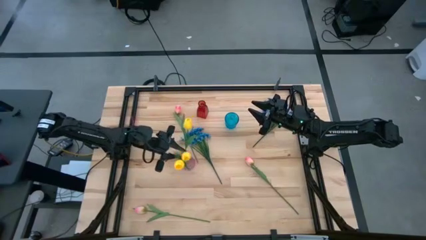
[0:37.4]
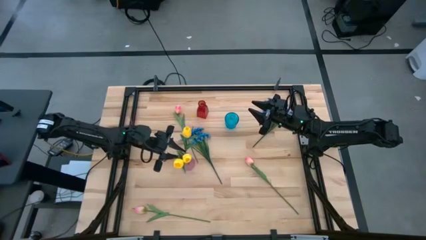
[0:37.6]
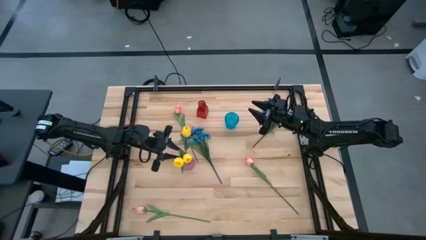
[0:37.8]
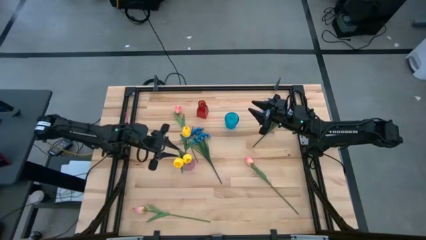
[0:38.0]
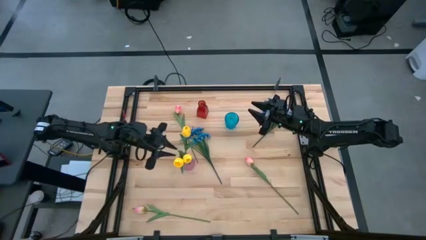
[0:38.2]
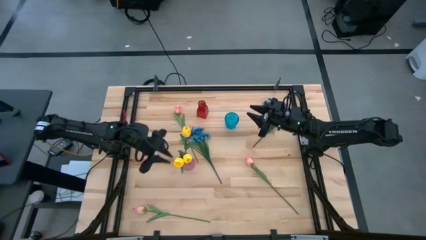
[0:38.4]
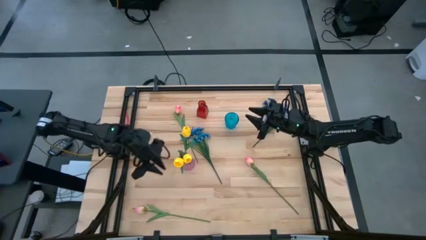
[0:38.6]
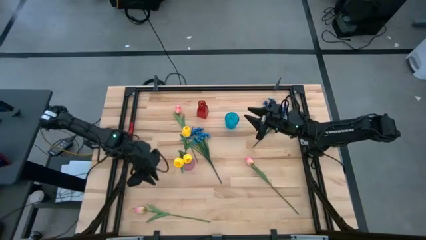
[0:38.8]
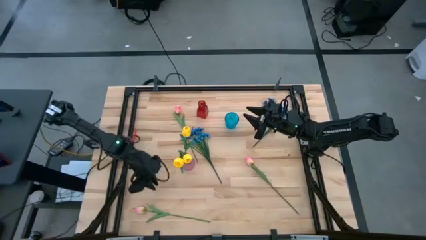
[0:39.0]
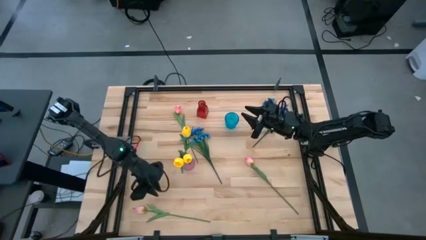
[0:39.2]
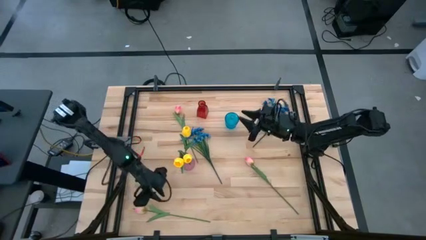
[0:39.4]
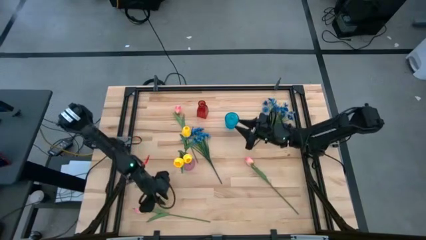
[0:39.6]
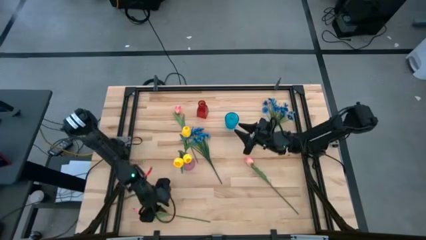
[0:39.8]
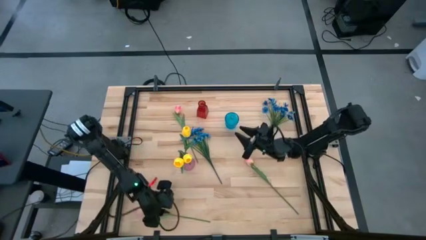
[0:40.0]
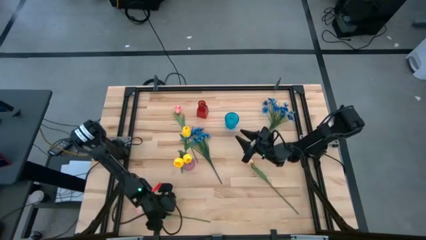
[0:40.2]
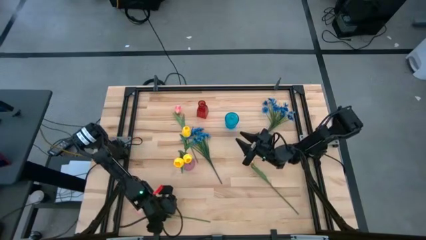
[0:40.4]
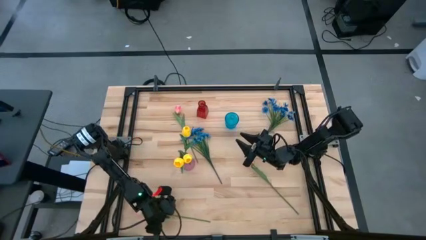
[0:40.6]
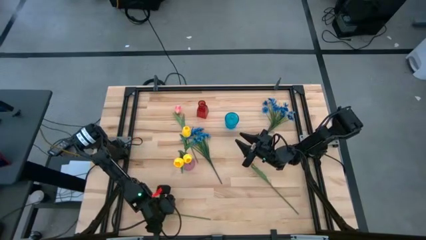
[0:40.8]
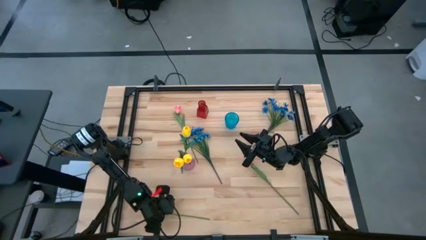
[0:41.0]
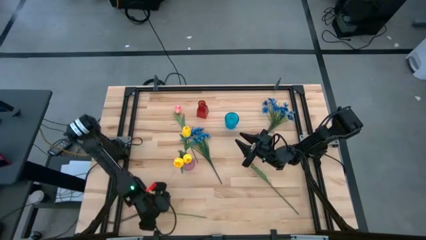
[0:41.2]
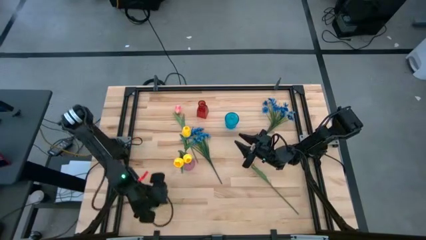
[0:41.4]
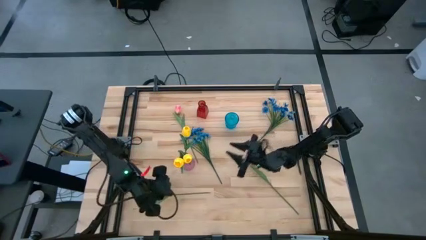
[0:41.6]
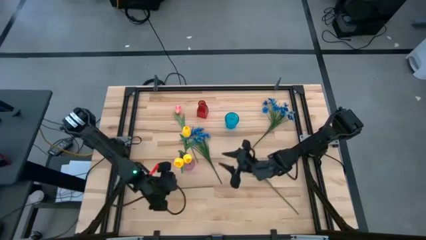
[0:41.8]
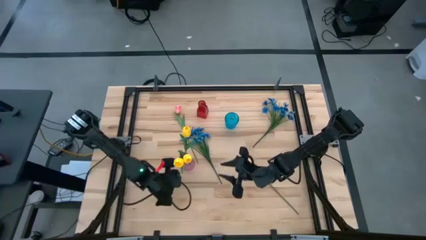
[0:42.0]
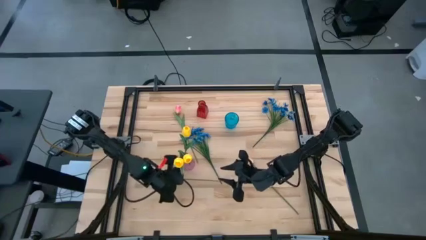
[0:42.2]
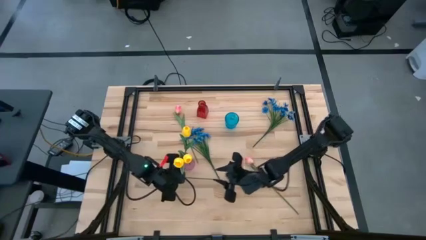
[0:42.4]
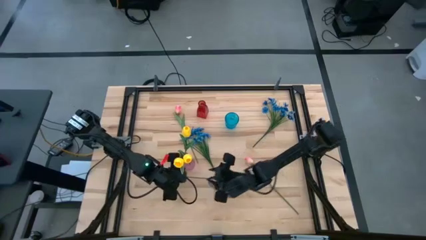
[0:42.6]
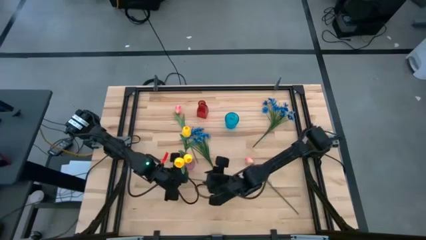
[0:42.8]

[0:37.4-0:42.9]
Task: Sort flowers into vase by color
Put the bottom left pink flower into the red vase

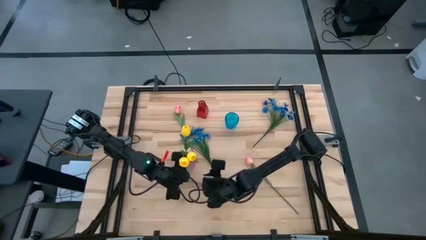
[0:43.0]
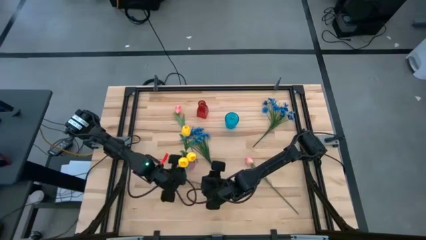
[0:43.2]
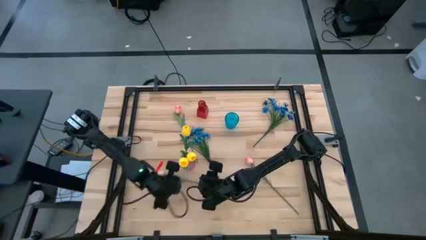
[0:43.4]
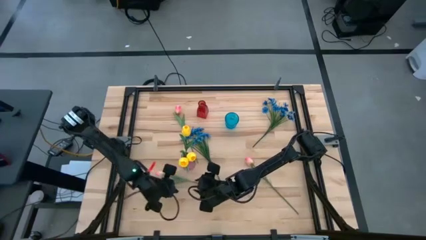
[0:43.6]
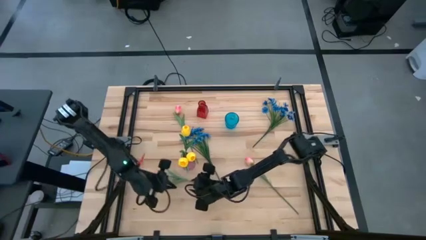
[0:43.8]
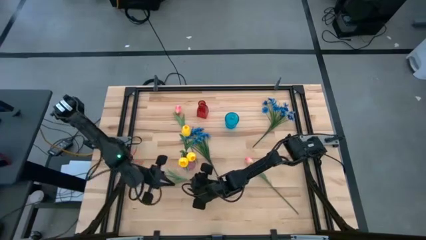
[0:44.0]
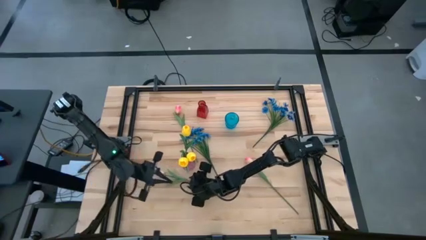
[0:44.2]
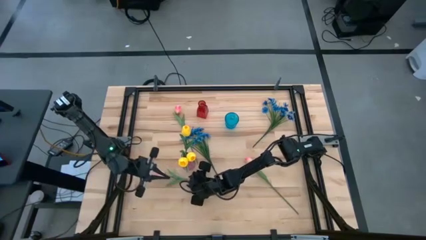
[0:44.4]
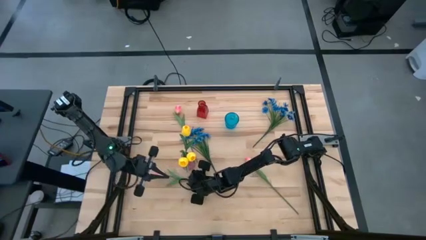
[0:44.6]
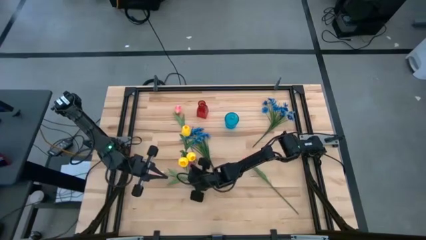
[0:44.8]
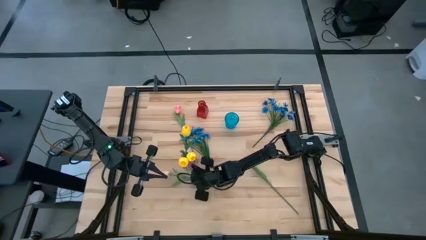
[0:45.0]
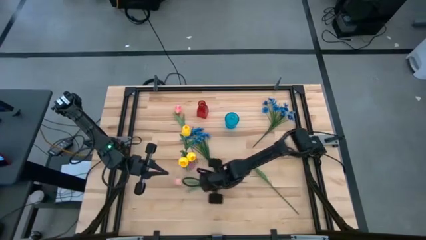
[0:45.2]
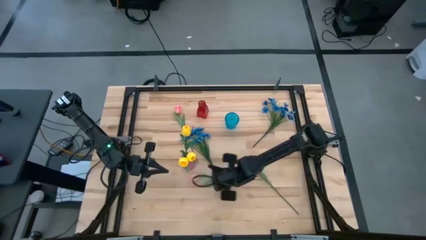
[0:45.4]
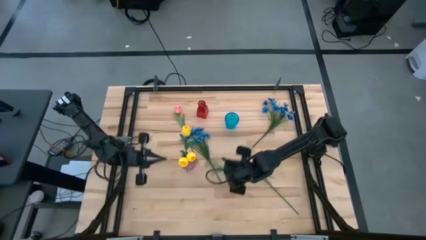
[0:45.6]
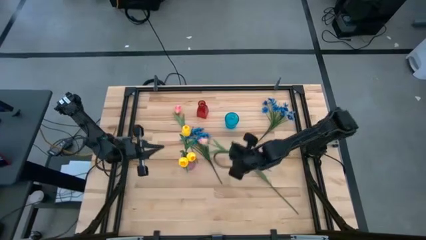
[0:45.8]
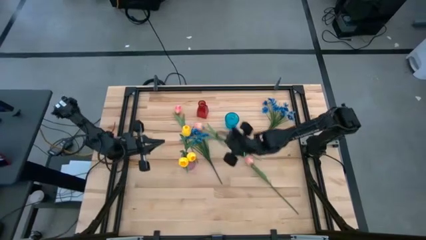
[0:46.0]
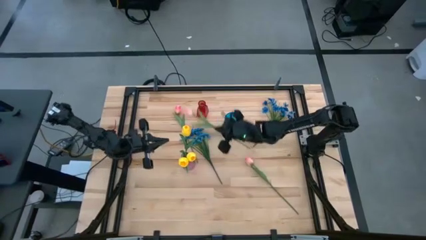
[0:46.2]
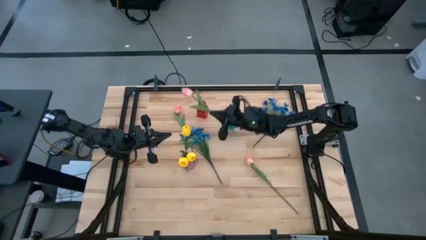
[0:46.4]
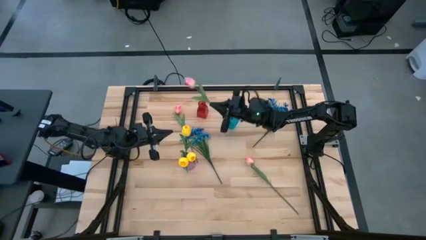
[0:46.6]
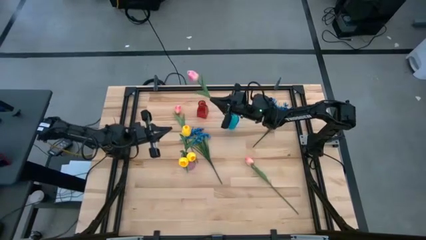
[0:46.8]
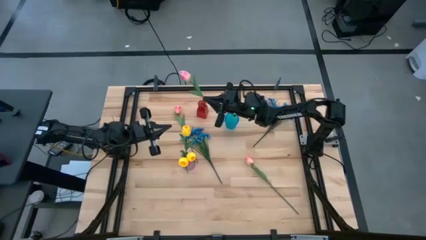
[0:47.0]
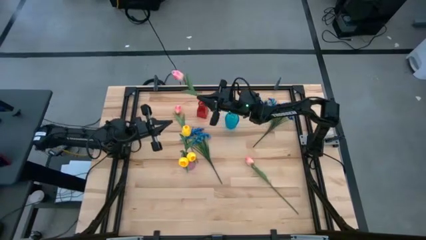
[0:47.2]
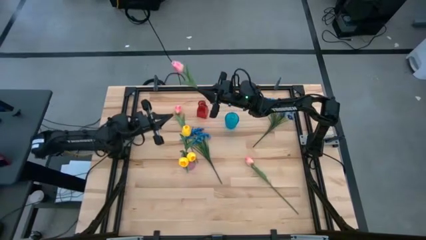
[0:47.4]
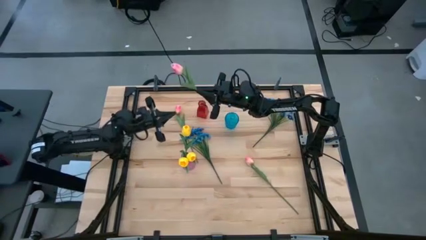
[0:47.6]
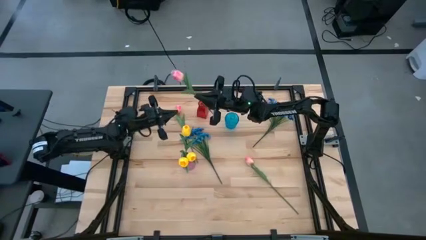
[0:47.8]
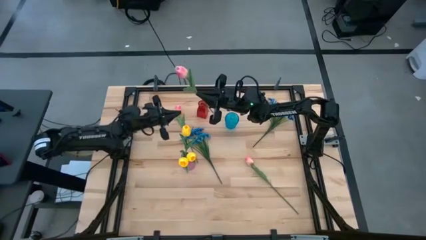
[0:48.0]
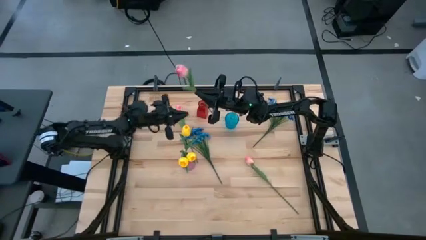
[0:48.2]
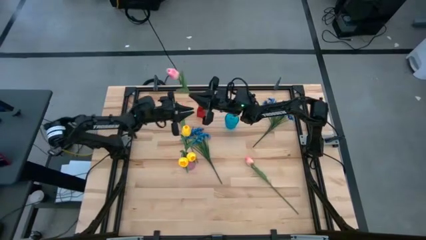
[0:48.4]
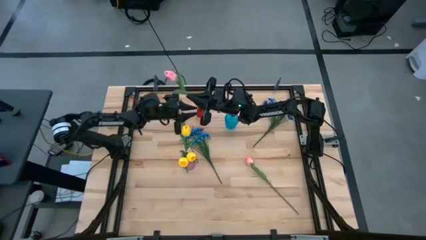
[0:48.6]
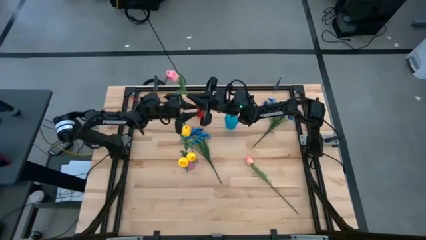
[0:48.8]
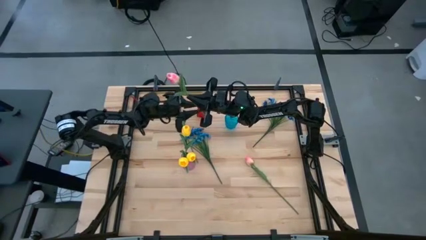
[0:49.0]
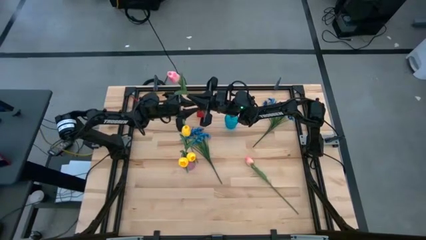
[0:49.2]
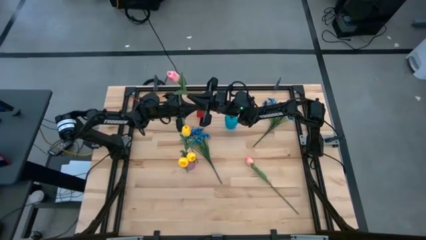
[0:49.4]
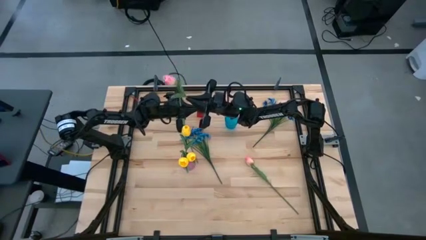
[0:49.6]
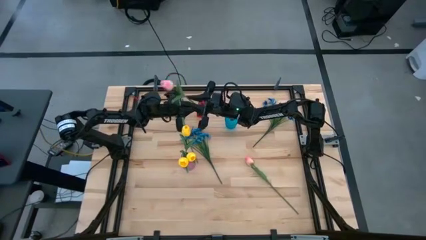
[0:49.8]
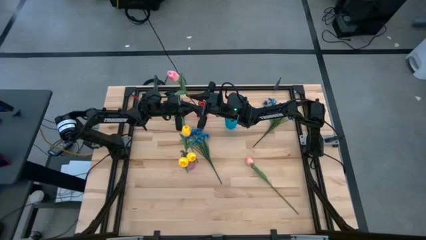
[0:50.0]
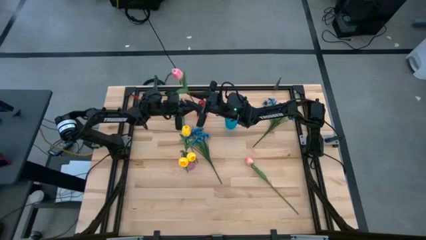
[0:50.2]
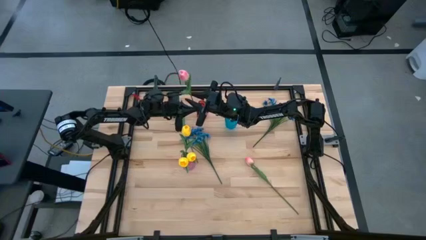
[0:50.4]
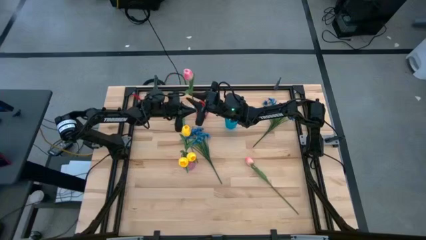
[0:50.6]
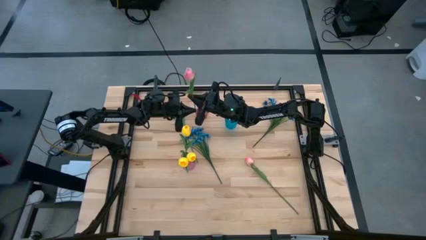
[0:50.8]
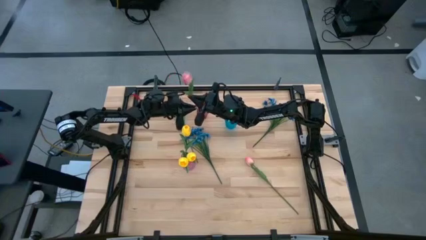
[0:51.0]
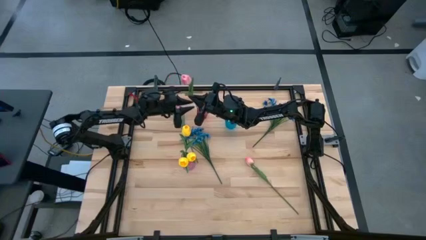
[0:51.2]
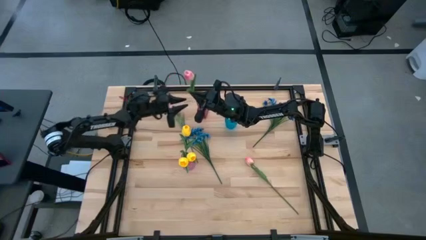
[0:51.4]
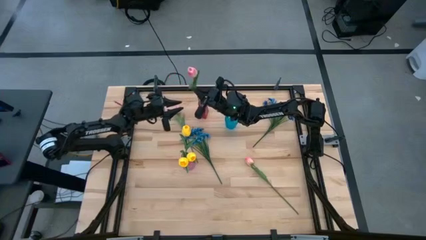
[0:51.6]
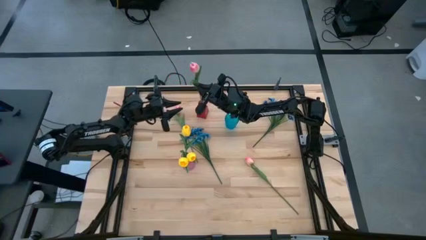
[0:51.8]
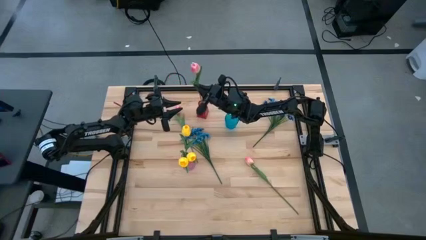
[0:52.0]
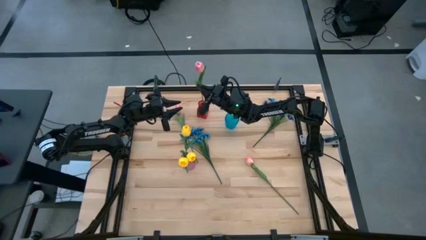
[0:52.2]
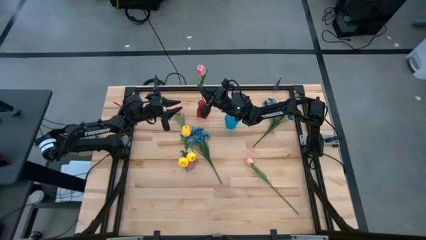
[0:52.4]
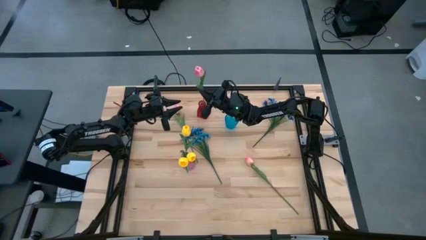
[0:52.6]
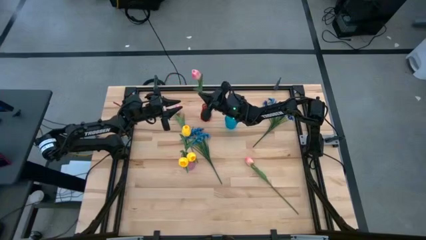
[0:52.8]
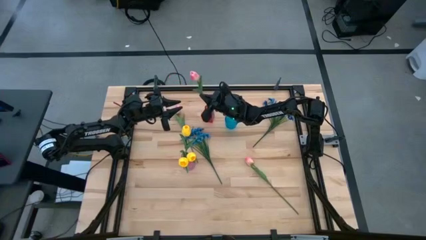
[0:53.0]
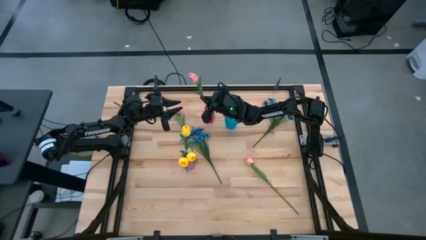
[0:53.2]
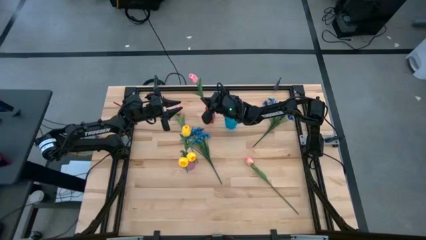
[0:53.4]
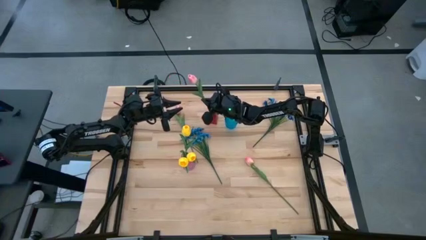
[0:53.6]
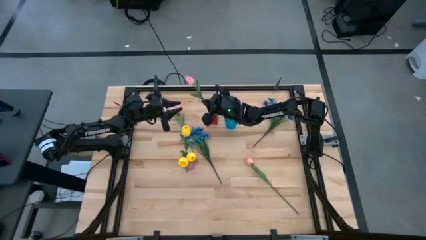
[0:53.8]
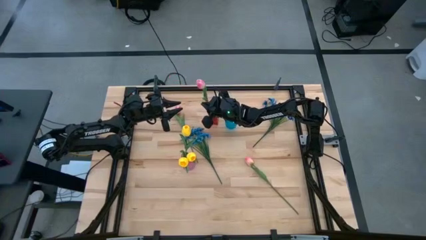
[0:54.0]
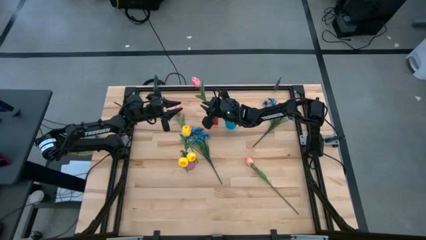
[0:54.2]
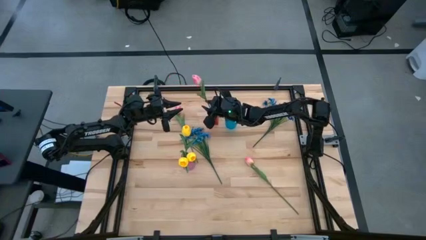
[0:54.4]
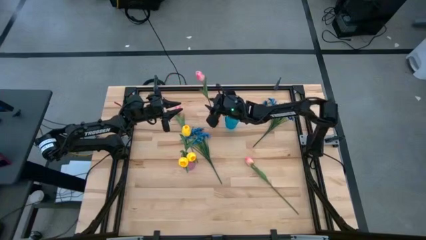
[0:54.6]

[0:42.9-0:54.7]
Put the bottom left pink flower into the red vase
